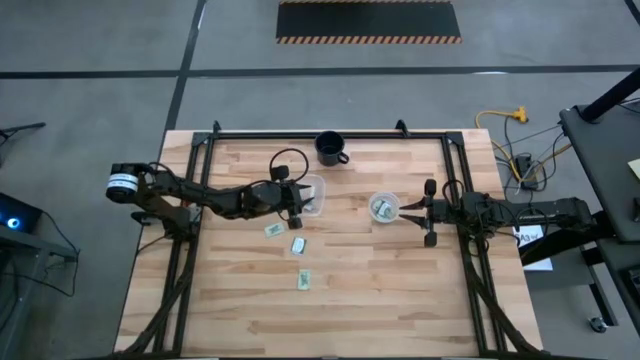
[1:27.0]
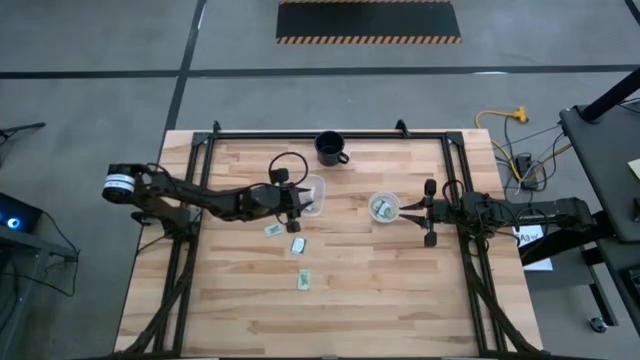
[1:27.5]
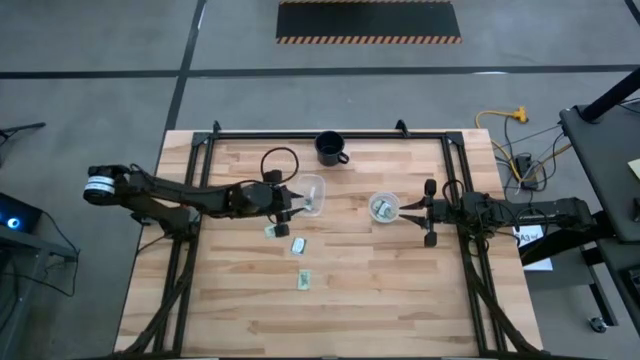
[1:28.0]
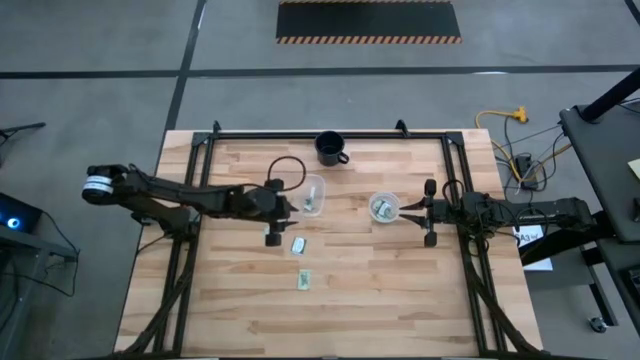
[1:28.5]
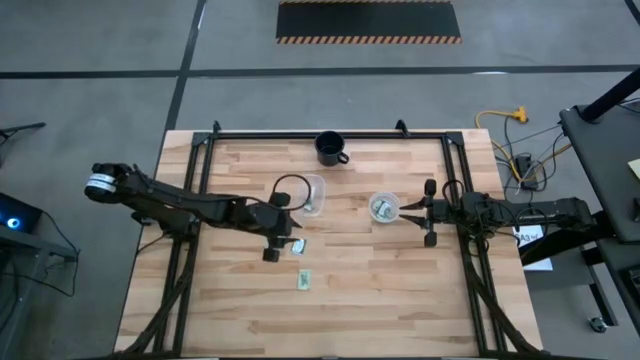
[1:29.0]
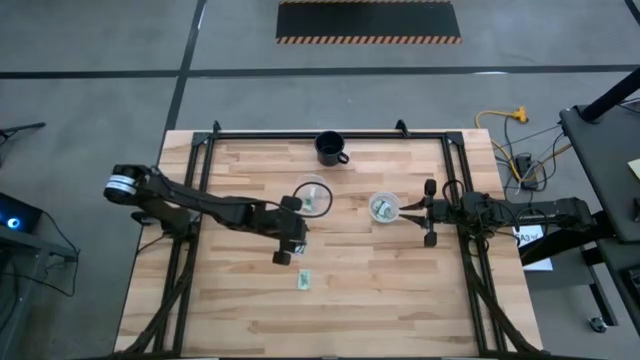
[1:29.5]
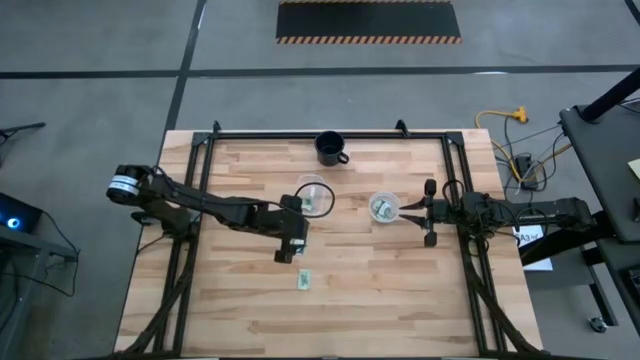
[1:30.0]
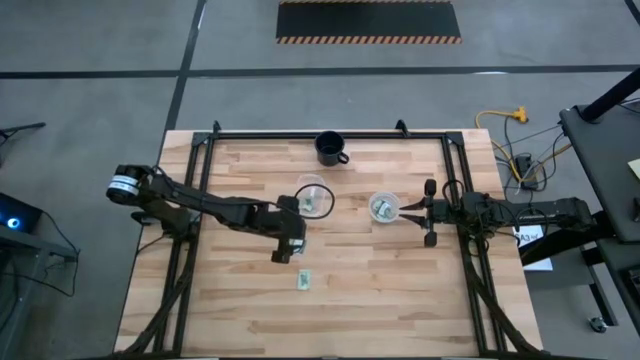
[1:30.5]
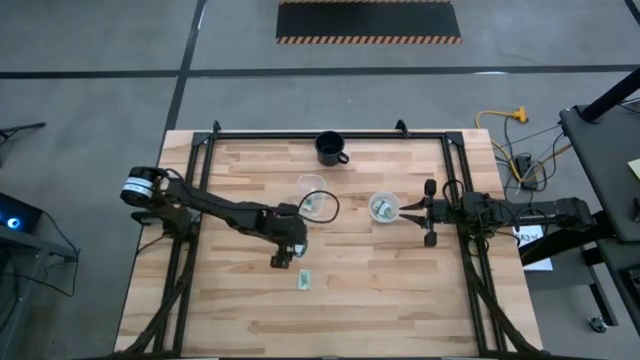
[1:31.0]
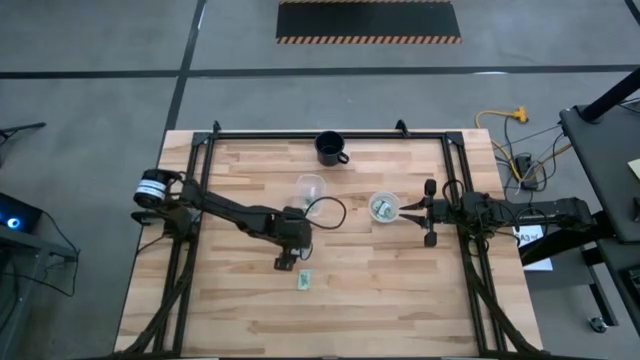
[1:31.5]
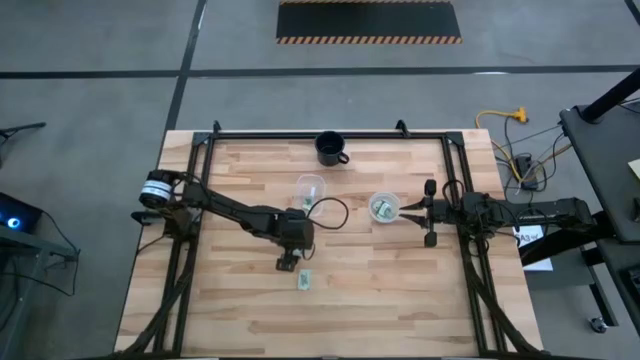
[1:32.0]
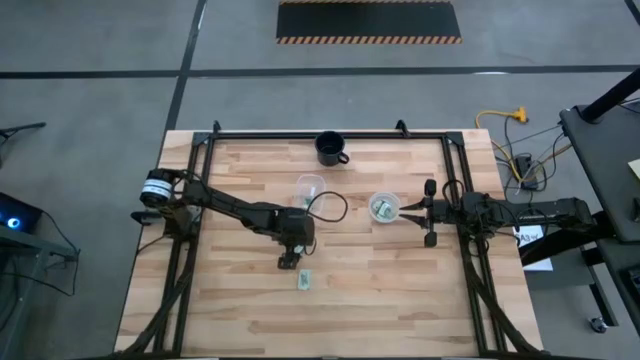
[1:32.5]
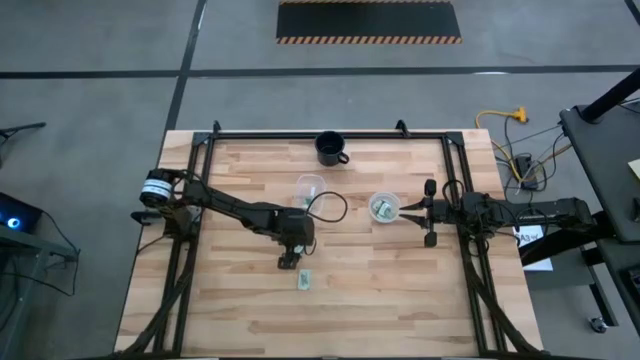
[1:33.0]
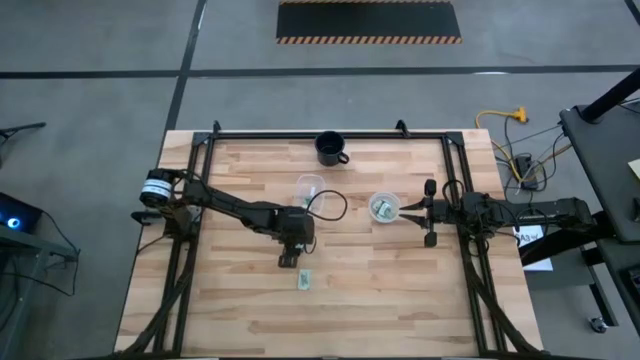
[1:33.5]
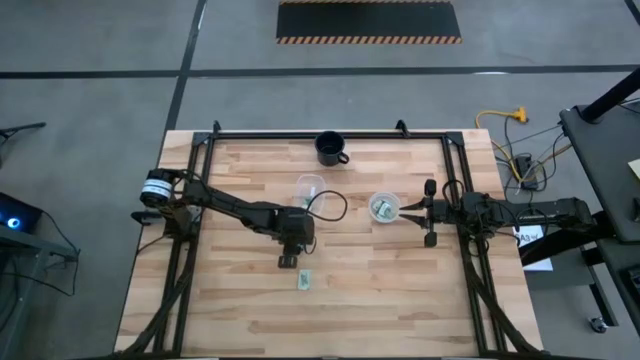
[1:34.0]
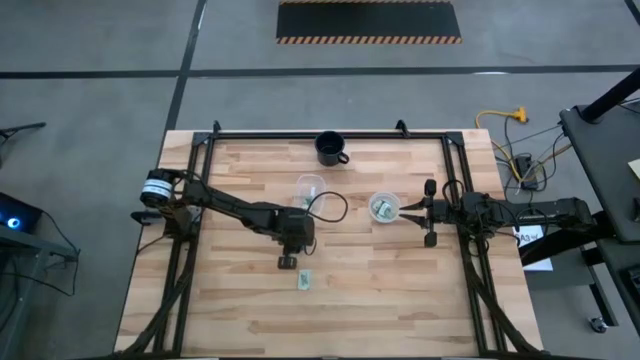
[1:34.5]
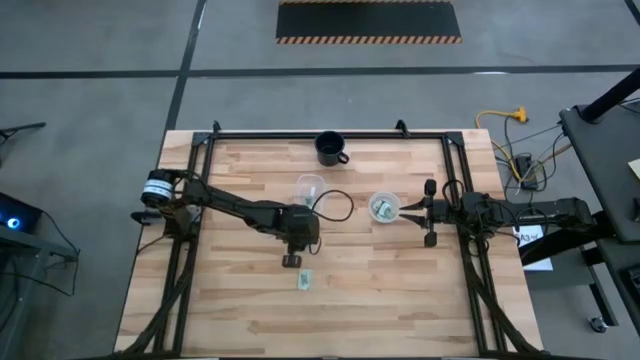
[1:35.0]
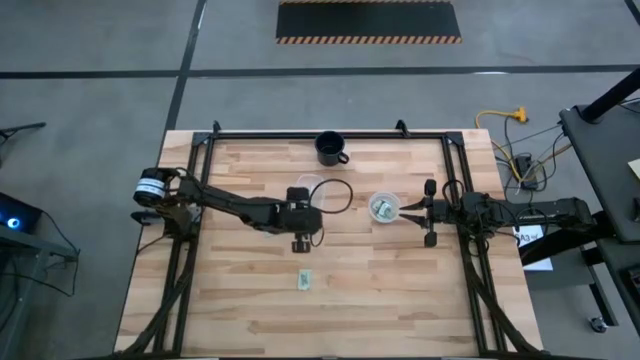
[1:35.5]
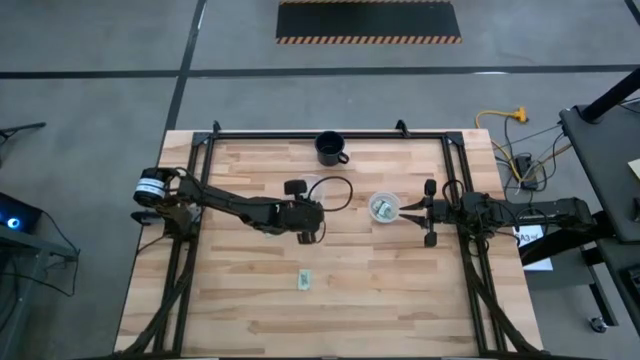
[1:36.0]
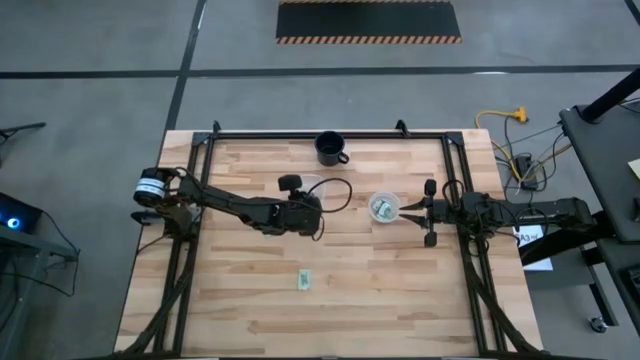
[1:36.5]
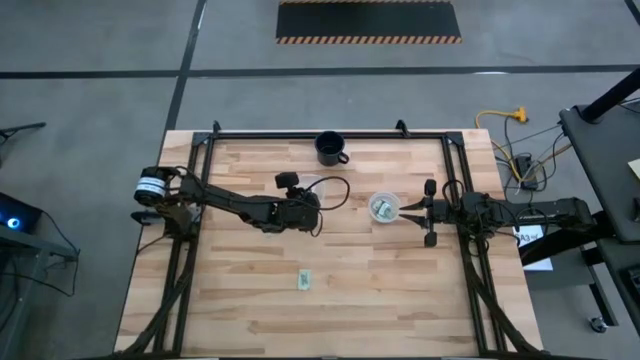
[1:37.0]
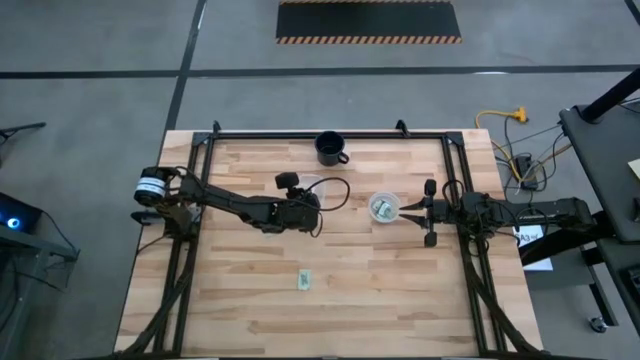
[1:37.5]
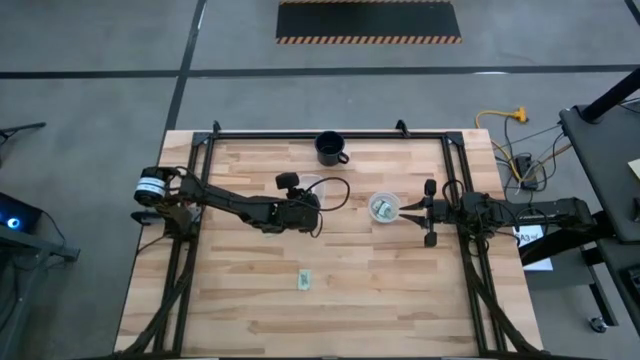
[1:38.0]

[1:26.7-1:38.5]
Task: Pick and place items into bin
Put the green stevia packet into the left transparent bin

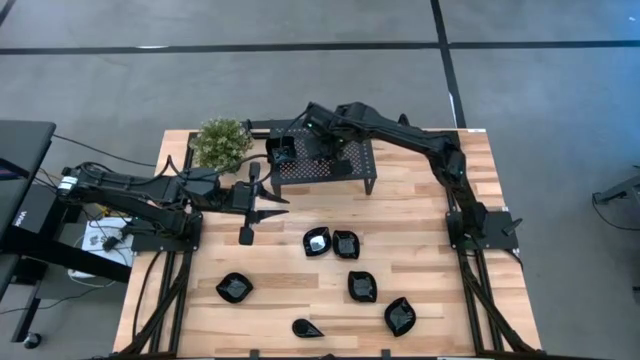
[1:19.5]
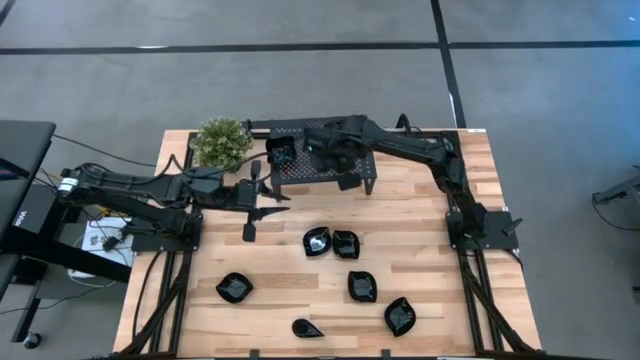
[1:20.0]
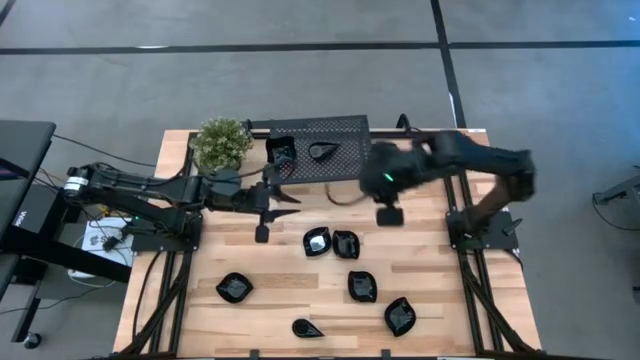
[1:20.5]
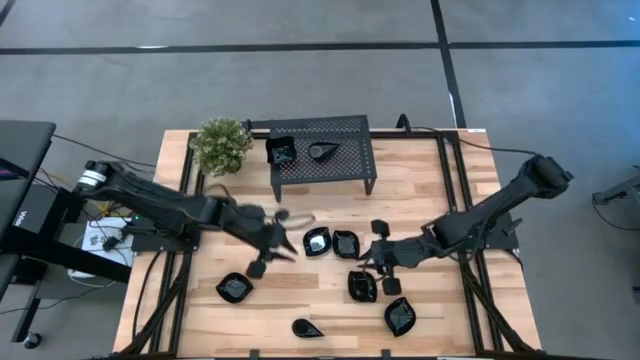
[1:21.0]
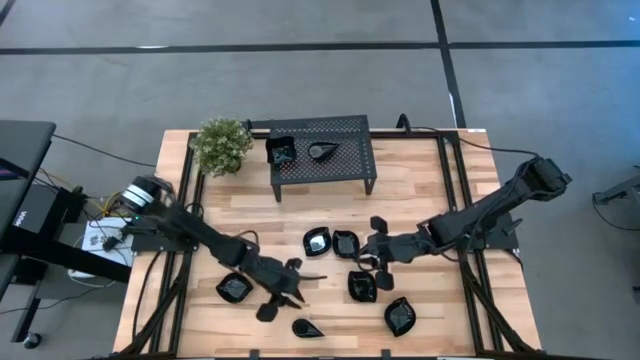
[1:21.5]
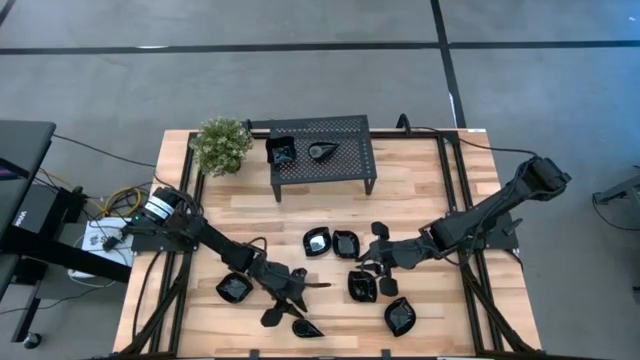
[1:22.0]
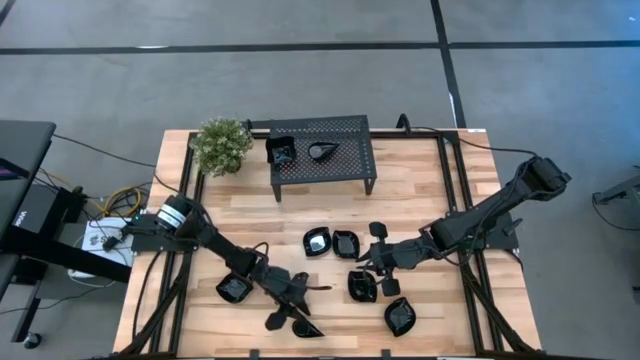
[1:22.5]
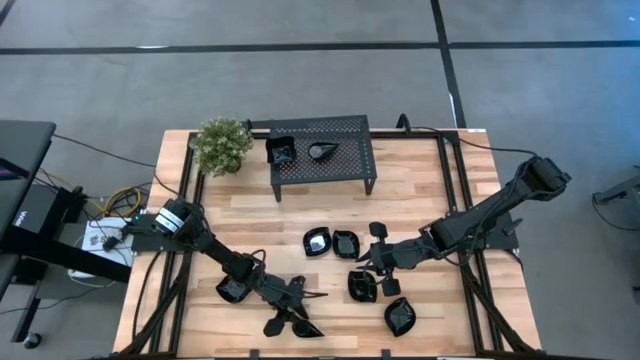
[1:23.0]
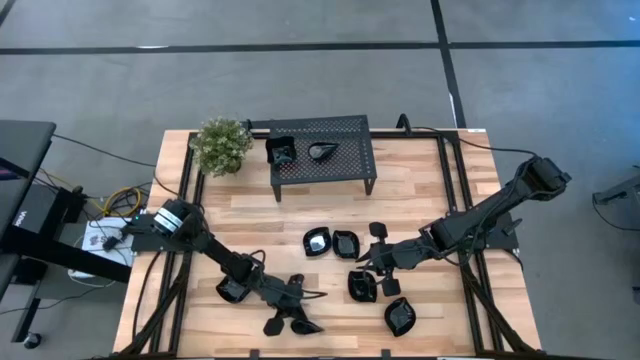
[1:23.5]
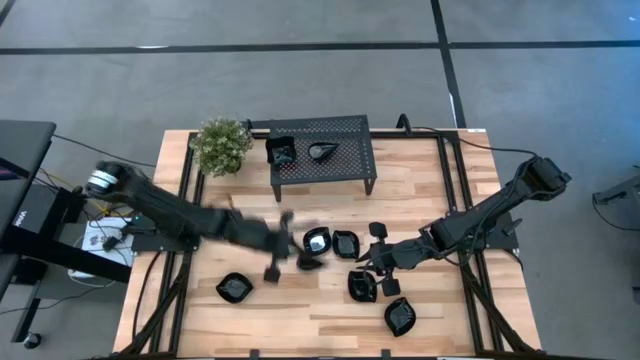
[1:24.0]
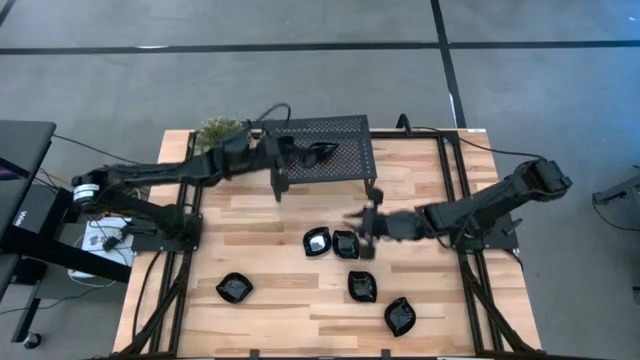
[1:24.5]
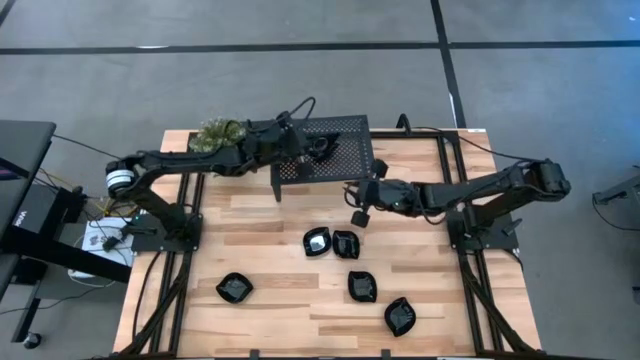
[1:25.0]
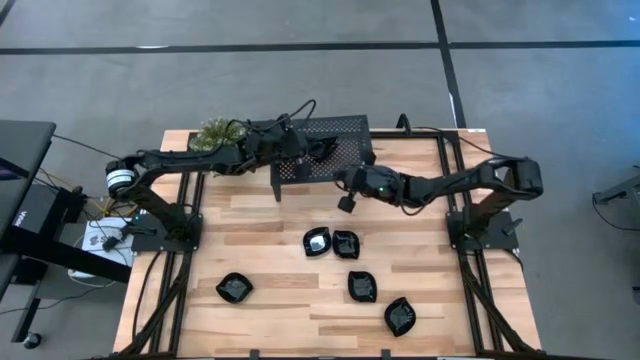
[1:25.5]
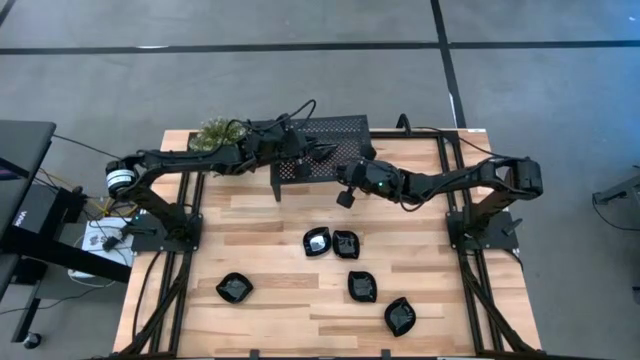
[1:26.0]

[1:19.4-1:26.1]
Task: Pick & Place Mini shaped plates
Stack the drop shaped plate on top of the drop shaped plates on the shelf

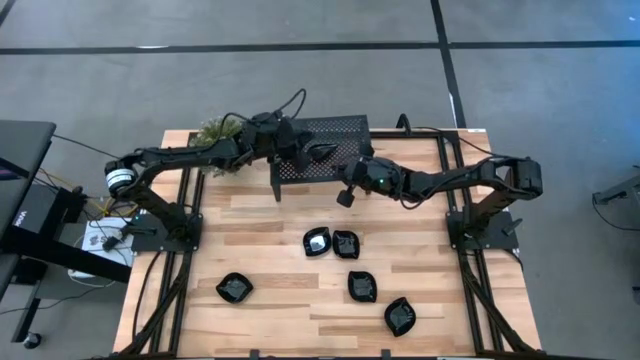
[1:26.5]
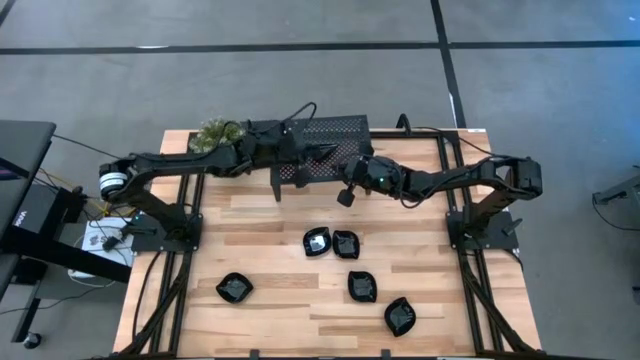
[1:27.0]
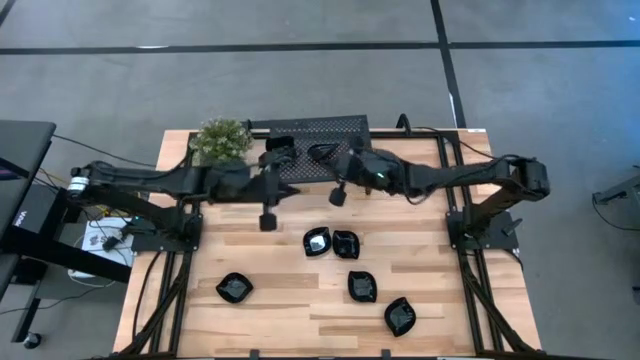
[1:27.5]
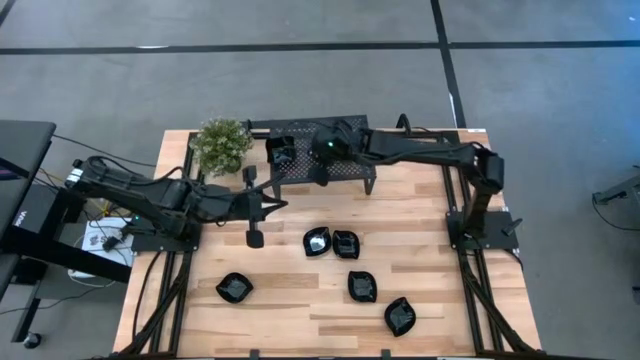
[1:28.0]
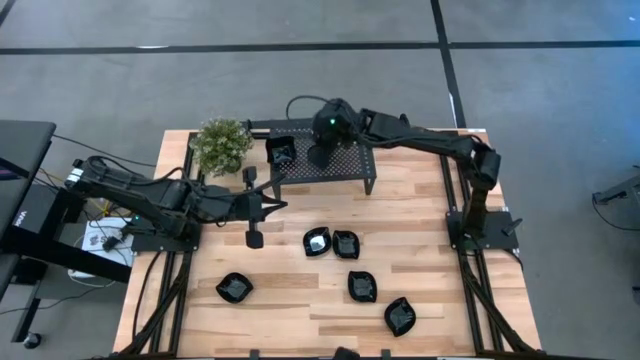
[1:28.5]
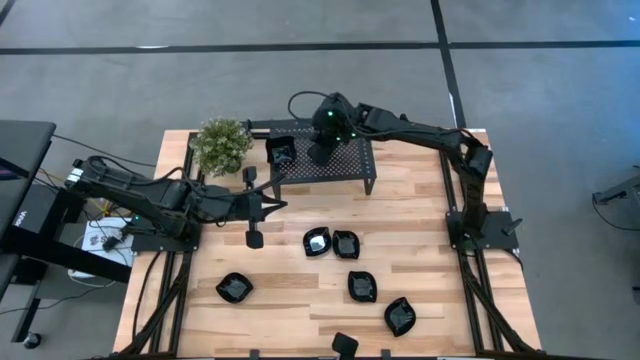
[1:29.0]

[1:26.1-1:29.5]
Adjust the stack of drop shaped plates on the shelf
